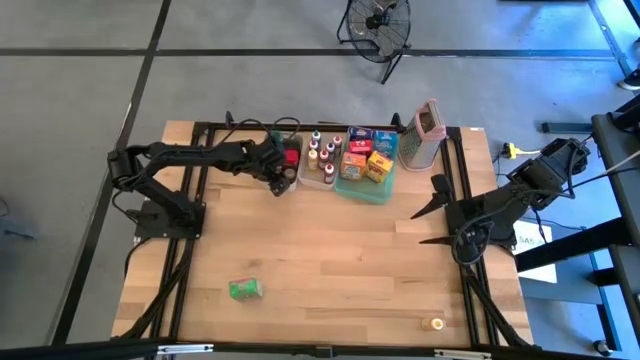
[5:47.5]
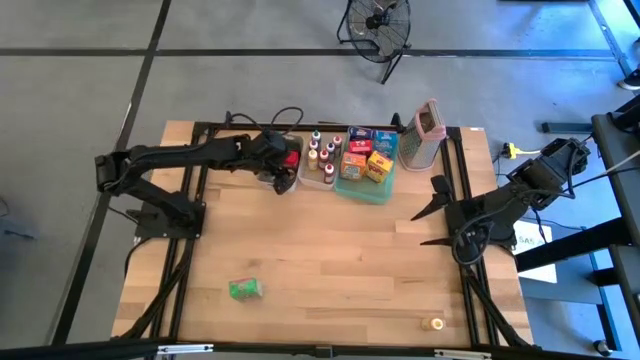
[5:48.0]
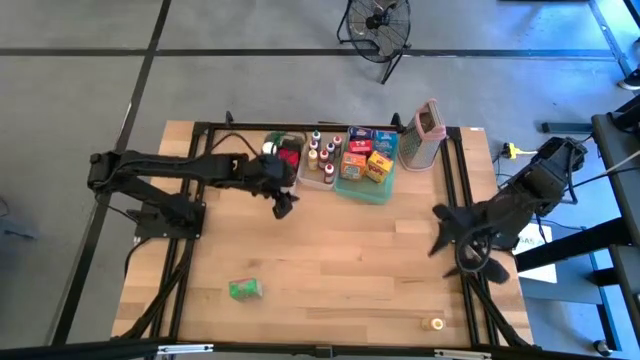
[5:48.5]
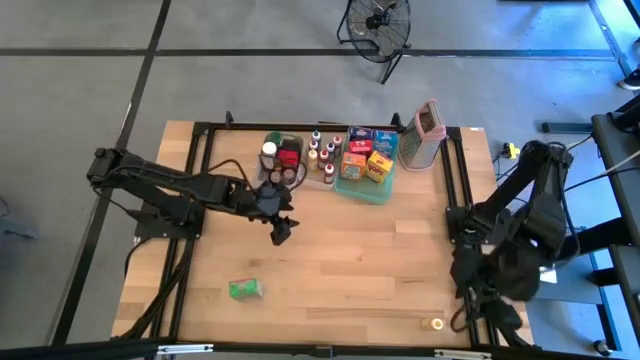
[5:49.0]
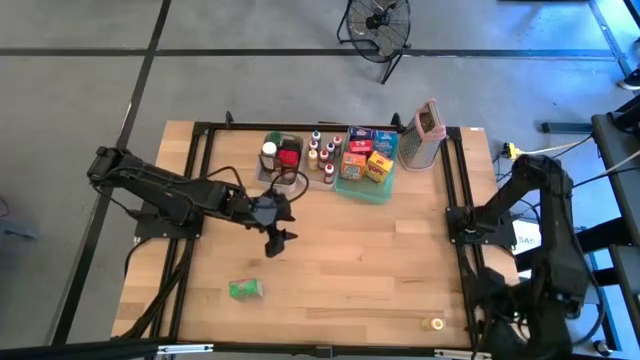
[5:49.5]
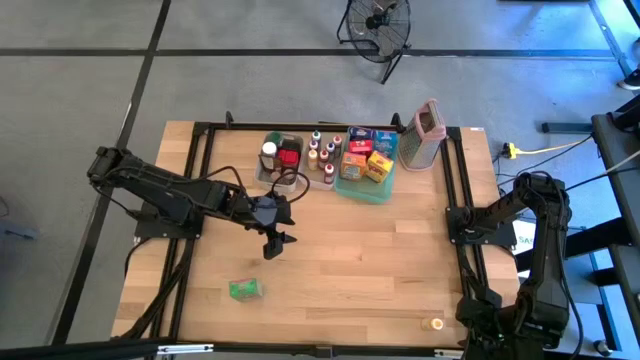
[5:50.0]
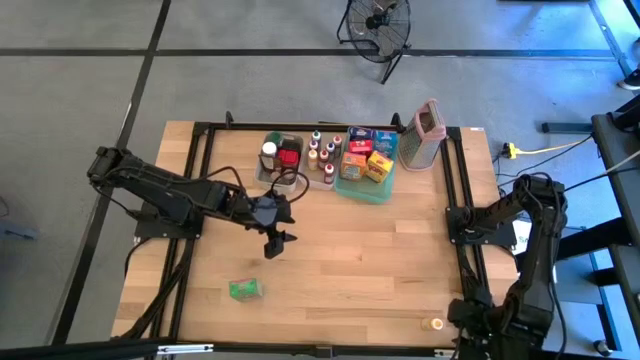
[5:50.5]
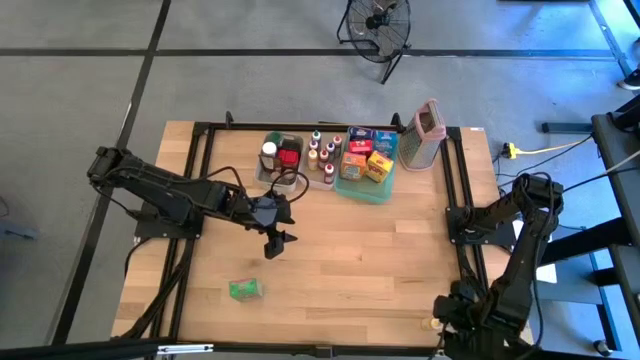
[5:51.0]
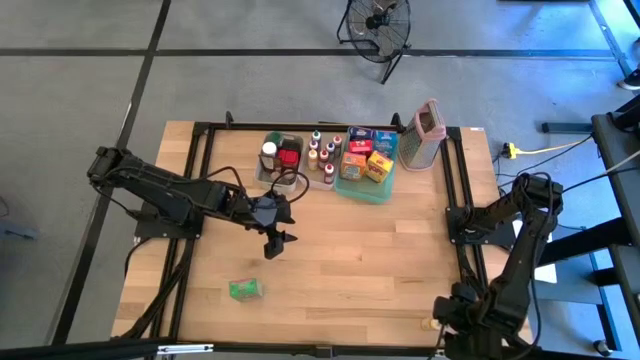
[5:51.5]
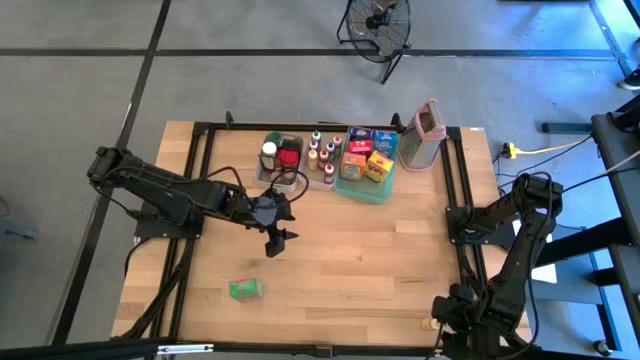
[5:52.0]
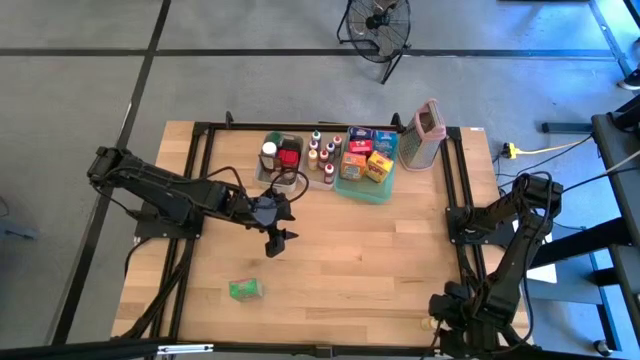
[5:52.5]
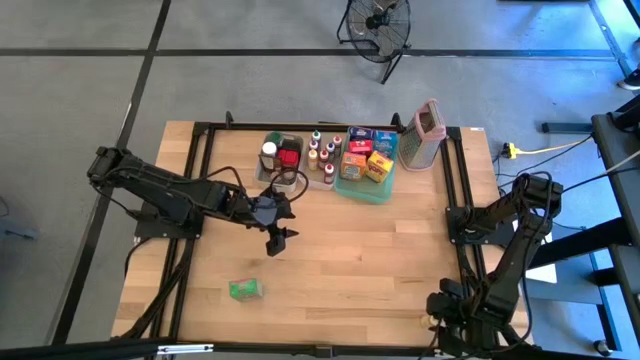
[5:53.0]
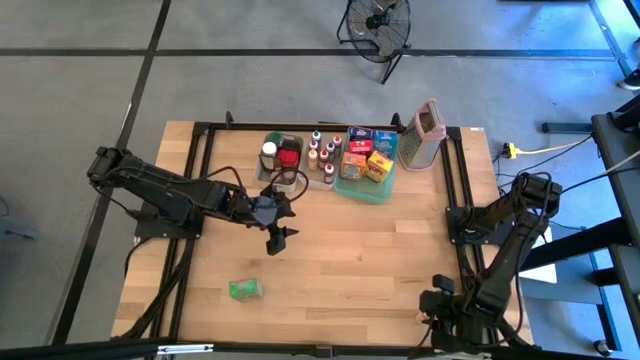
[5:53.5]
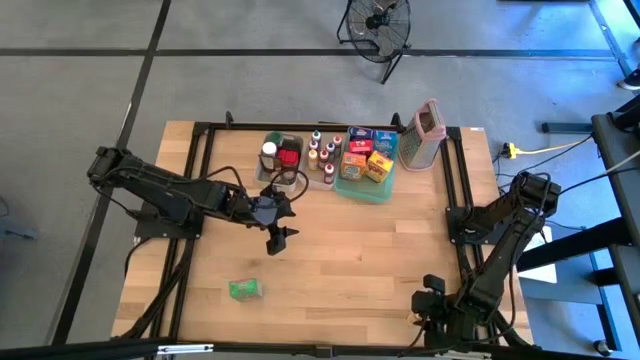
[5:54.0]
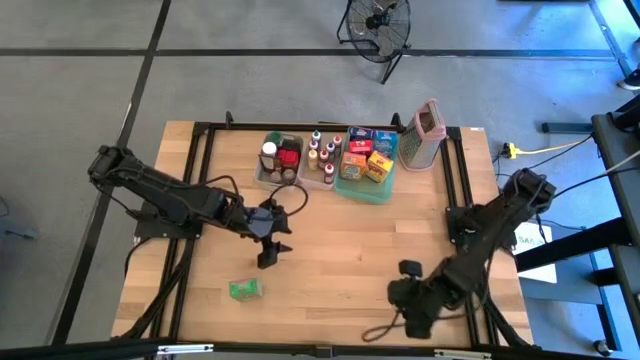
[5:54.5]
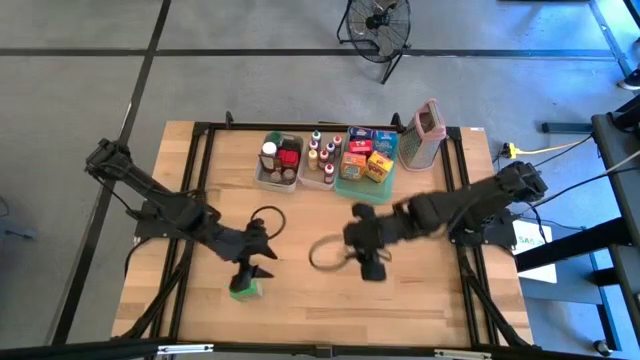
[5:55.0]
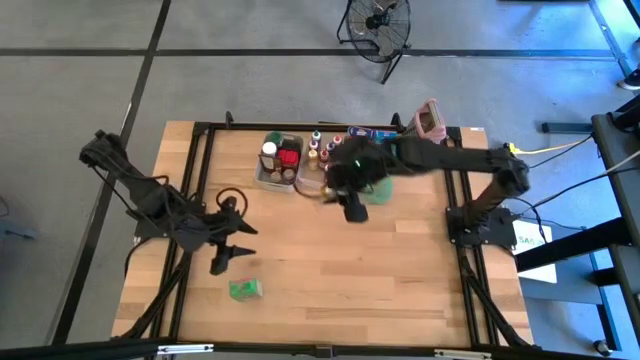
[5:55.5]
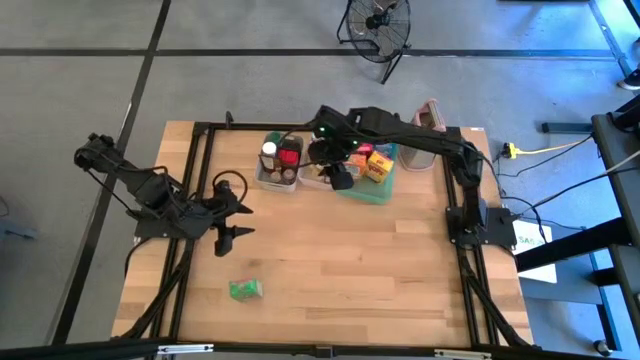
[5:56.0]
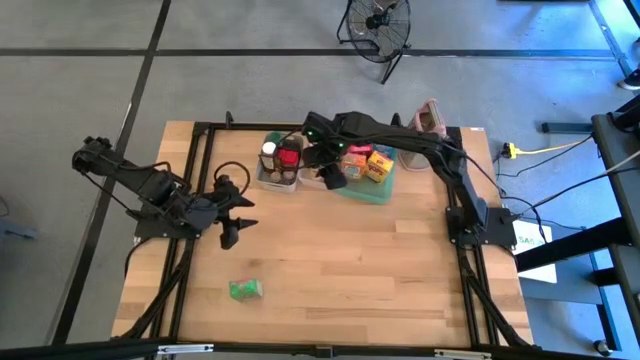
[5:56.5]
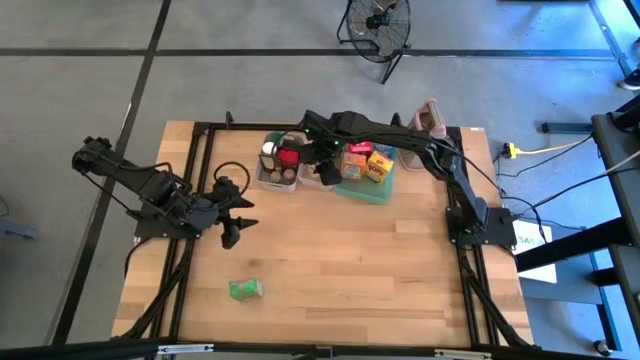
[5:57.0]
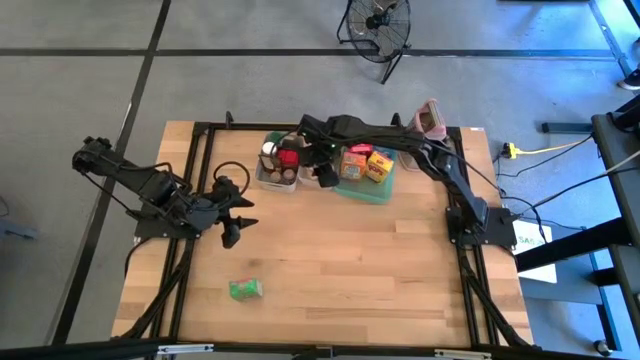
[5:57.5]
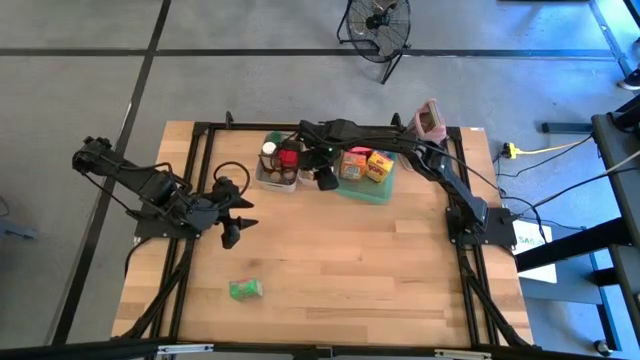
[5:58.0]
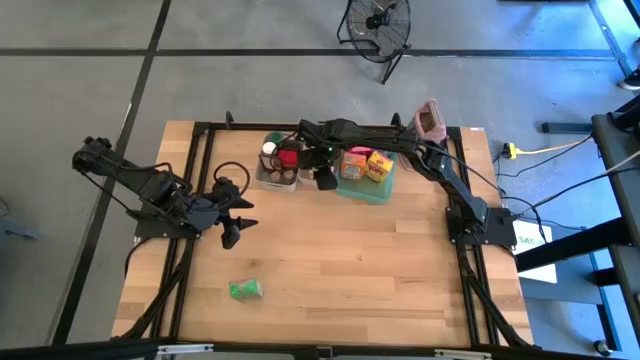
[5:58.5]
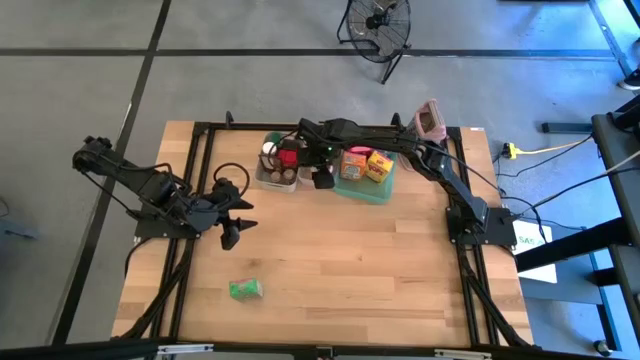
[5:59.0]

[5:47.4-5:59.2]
Task: Pick & Place Kitchen Items
Put the yellow food coloring bottle into the transparent bin

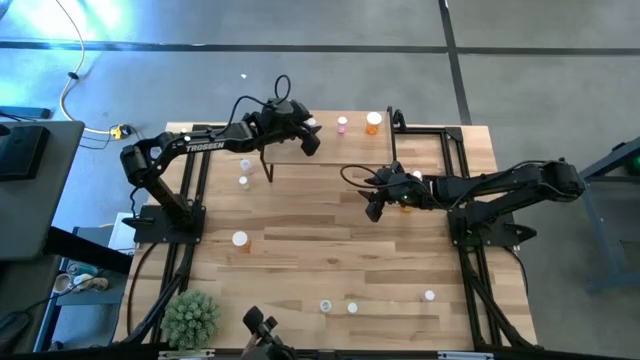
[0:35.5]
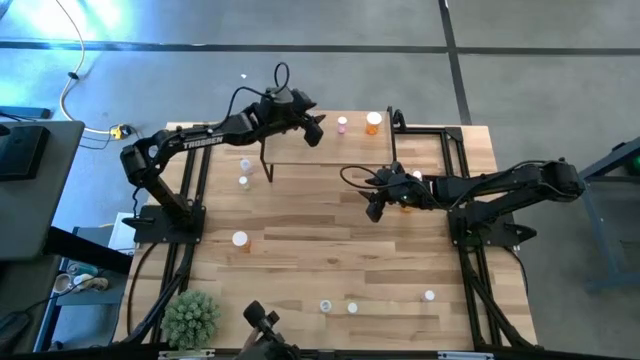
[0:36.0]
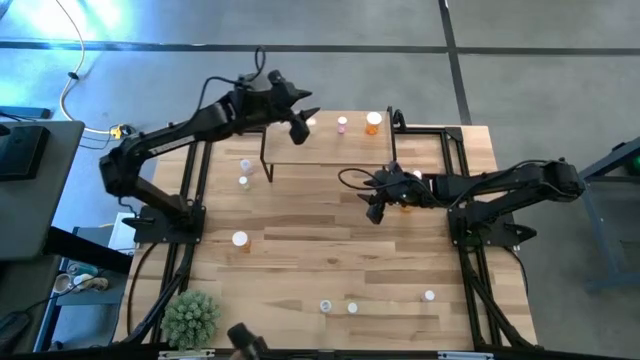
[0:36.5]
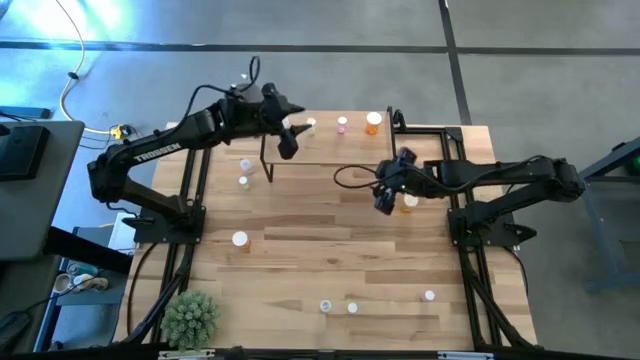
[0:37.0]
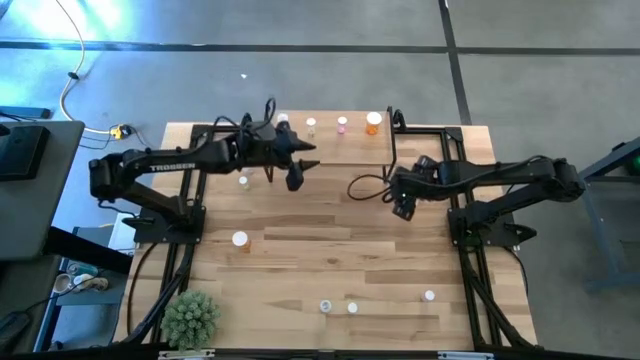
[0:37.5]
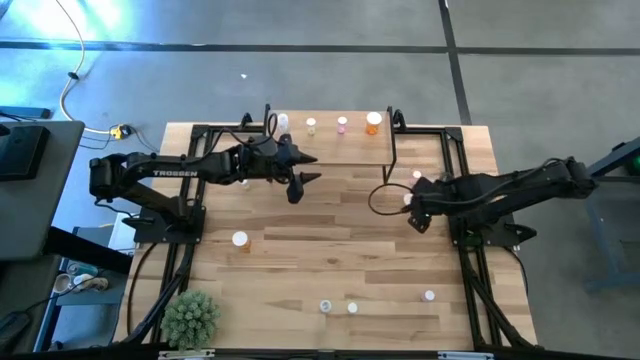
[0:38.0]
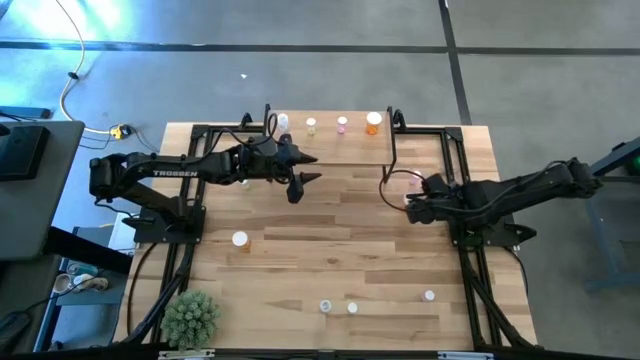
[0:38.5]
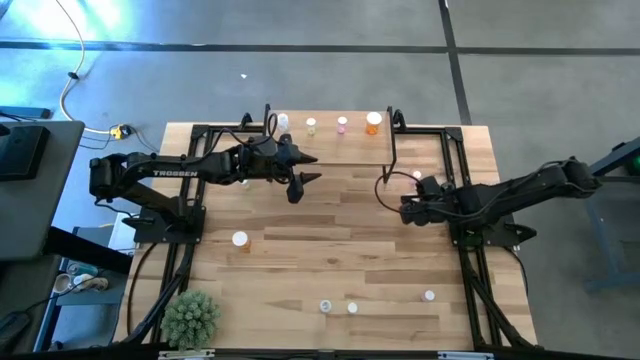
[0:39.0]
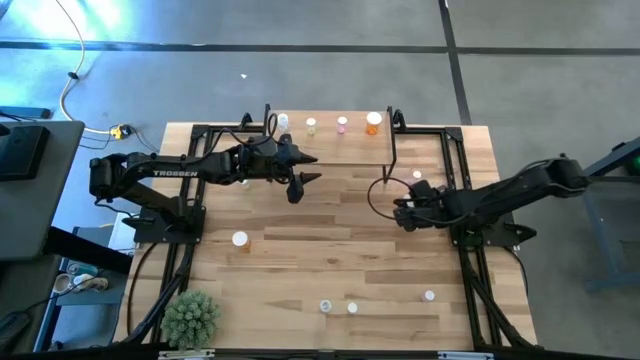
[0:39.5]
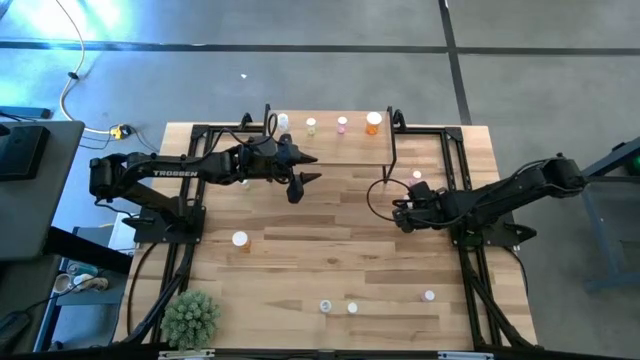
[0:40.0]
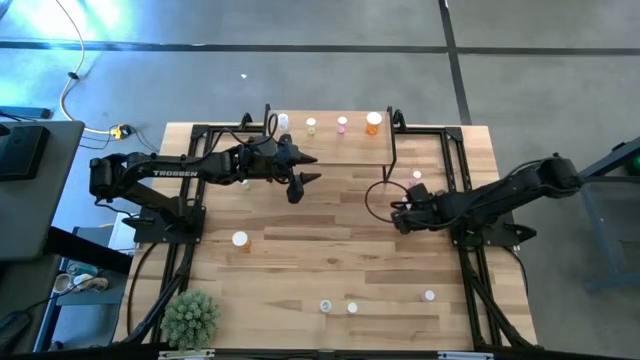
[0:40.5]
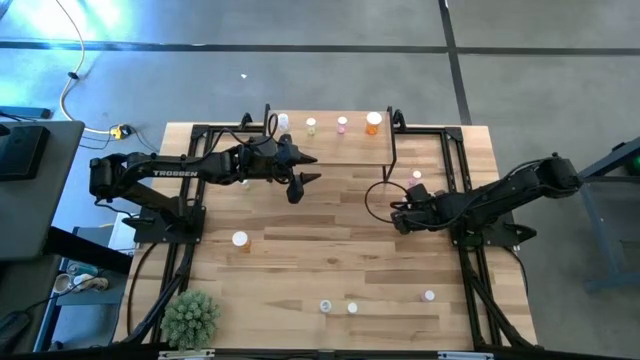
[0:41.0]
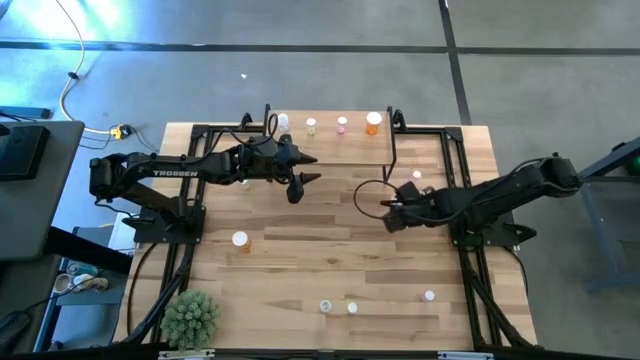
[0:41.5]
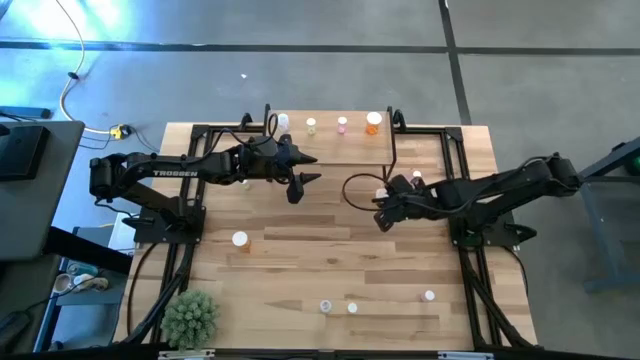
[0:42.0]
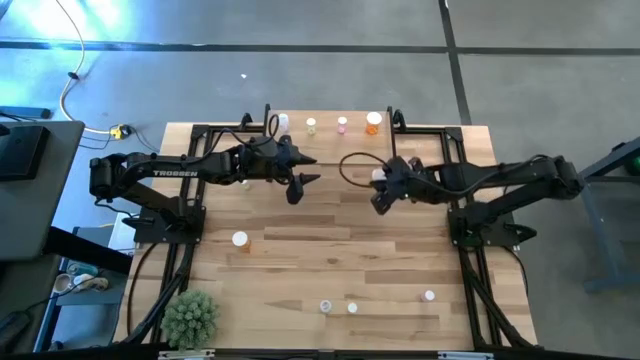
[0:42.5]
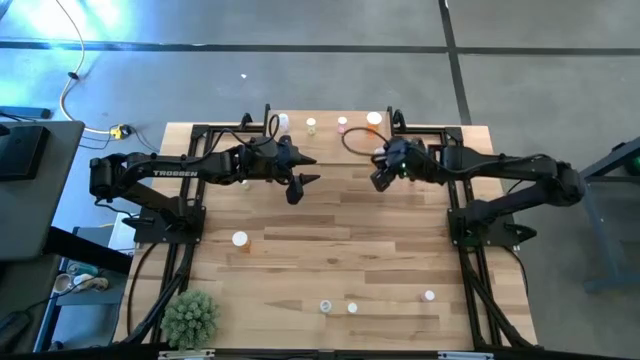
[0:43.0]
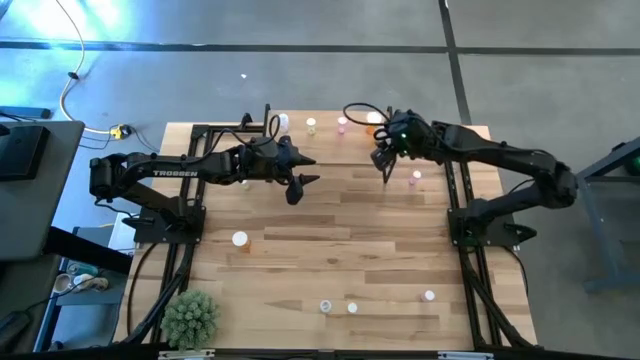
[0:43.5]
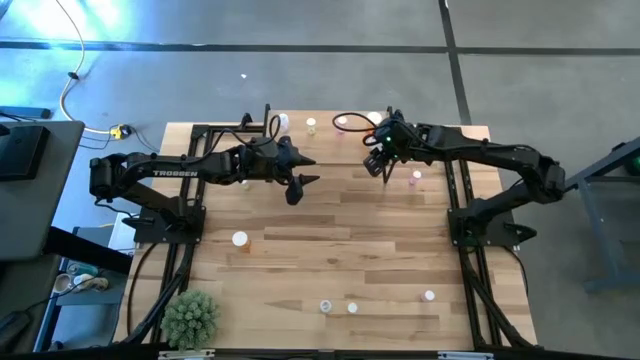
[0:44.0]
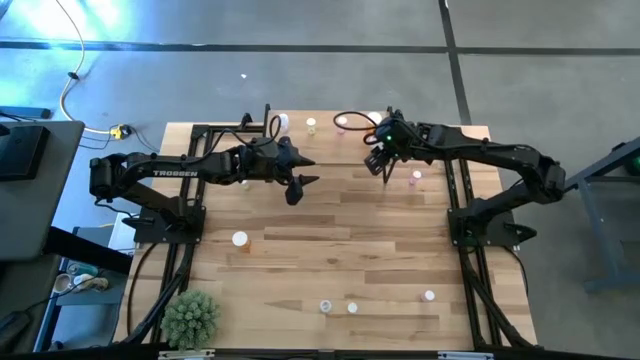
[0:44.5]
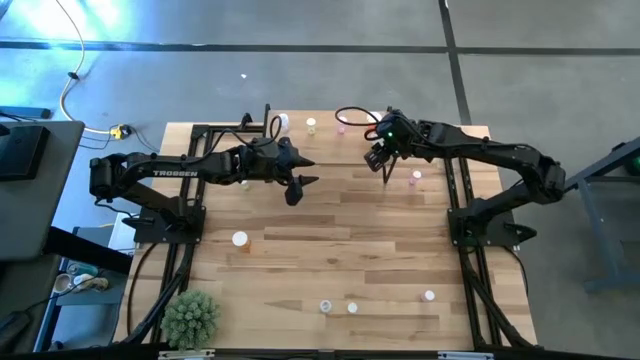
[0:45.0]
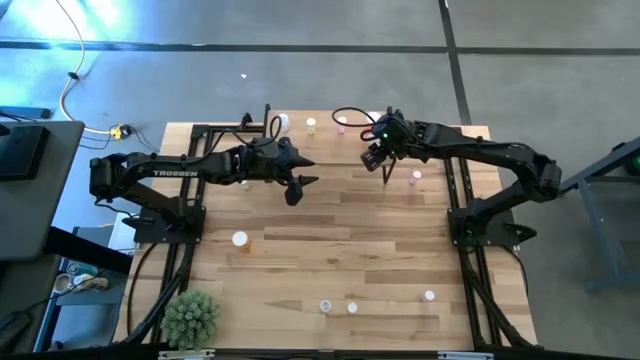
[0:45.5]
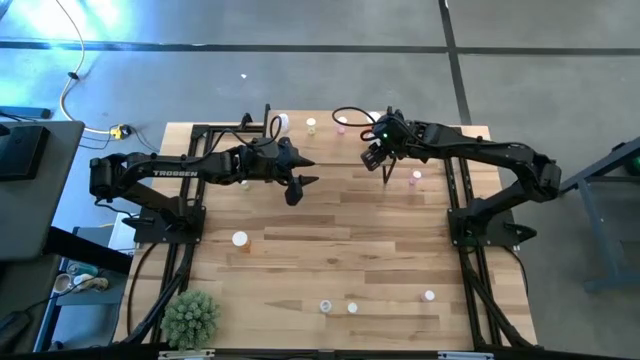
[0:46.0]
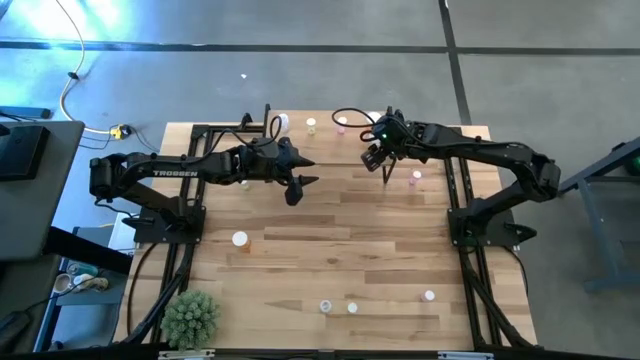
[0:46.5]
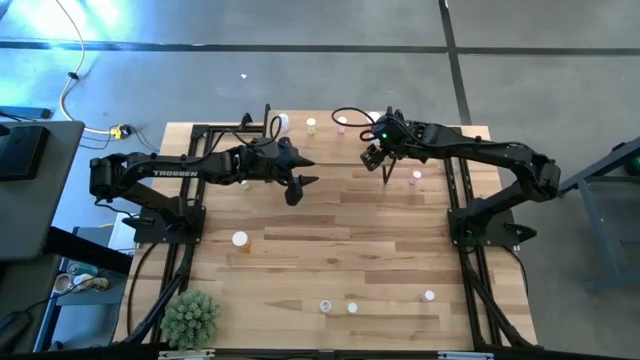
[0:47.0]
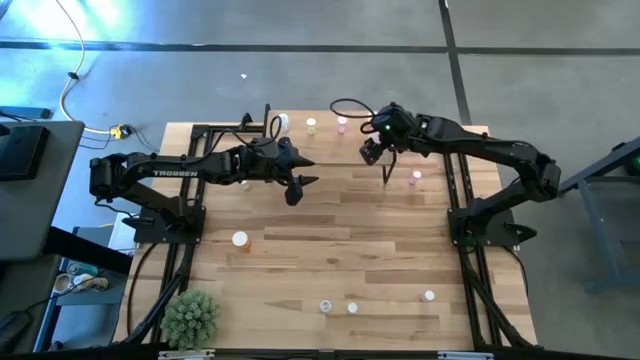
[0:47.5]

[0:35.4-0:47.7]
Task: Pick and place medicine bottles onto shelf by color
Put the right orange pill bottle on the shelf aligned with the orange pill bottle
